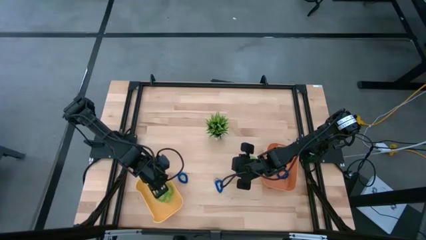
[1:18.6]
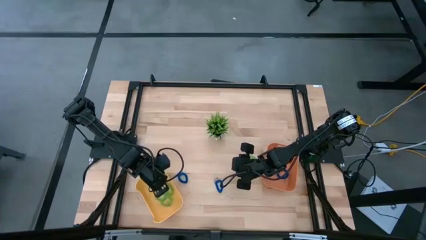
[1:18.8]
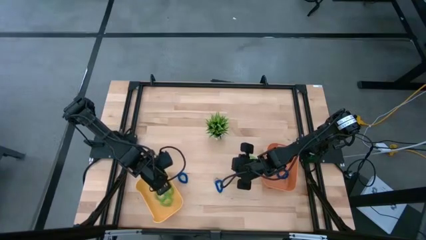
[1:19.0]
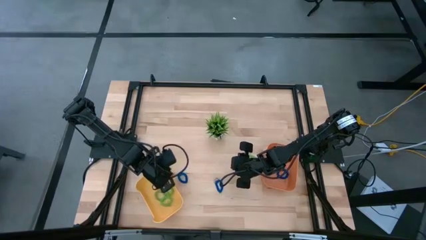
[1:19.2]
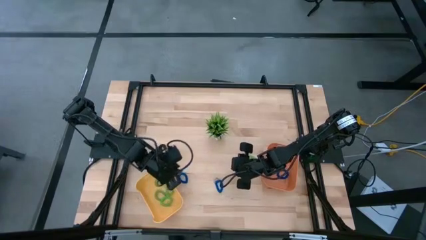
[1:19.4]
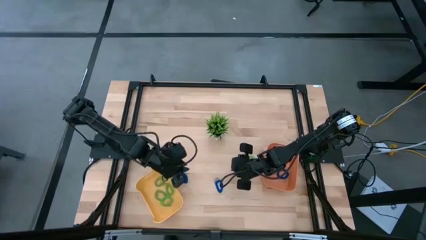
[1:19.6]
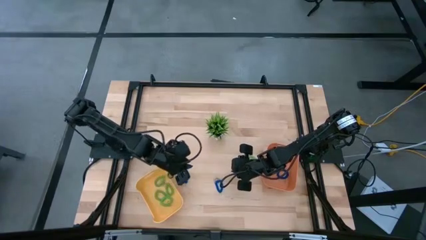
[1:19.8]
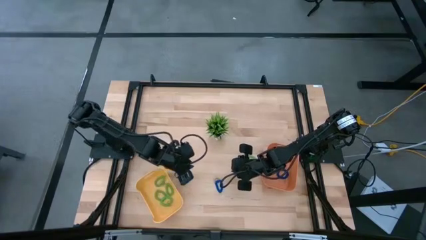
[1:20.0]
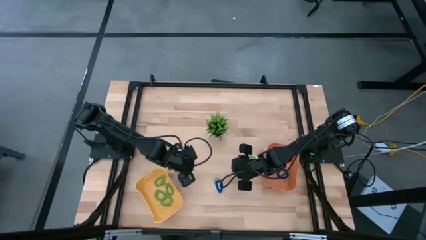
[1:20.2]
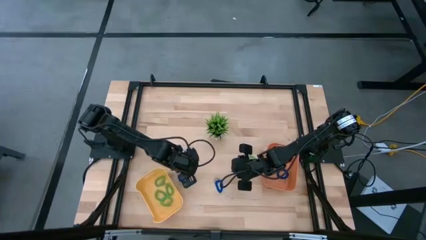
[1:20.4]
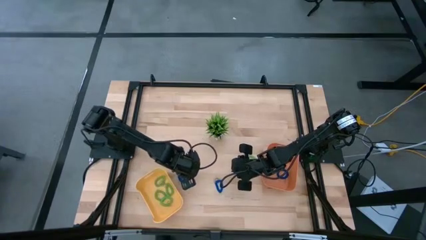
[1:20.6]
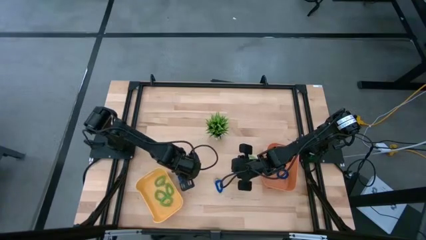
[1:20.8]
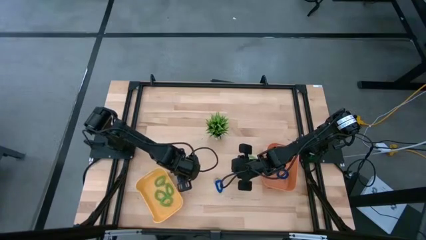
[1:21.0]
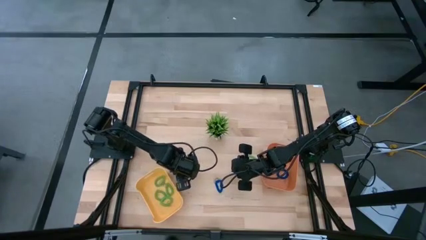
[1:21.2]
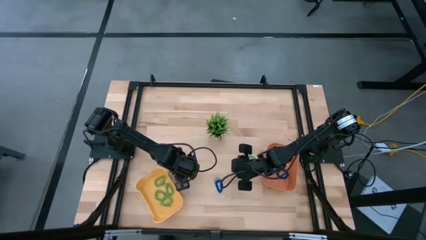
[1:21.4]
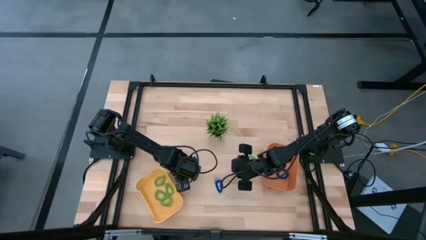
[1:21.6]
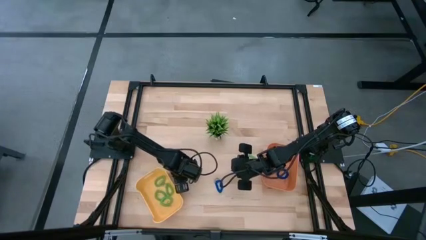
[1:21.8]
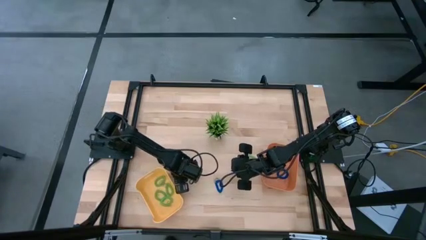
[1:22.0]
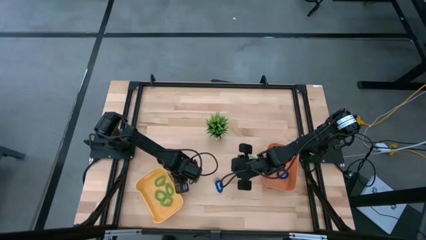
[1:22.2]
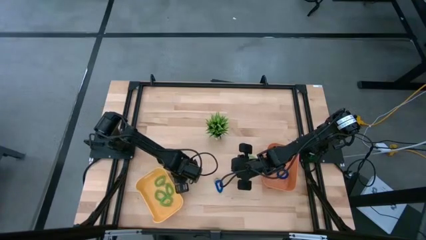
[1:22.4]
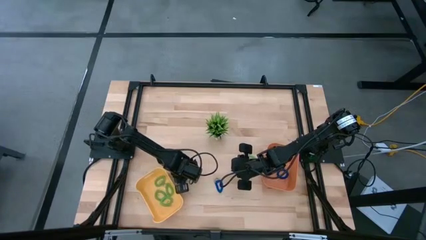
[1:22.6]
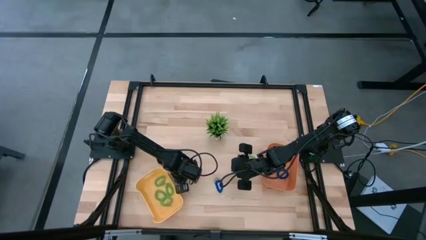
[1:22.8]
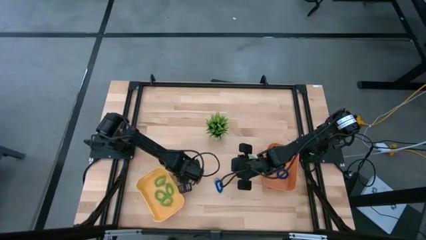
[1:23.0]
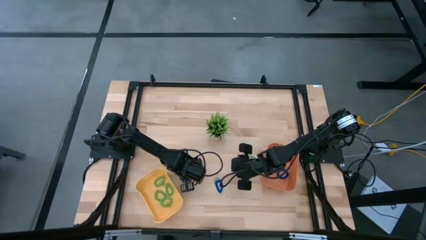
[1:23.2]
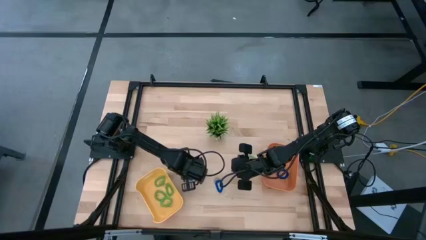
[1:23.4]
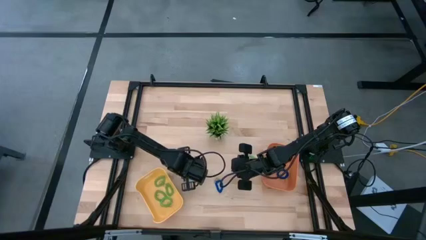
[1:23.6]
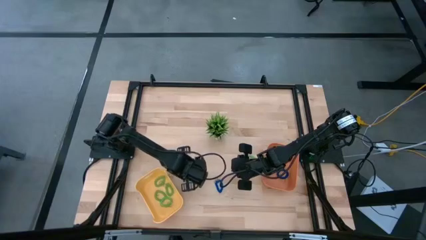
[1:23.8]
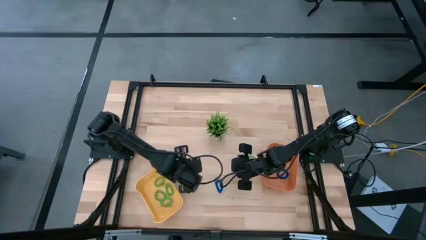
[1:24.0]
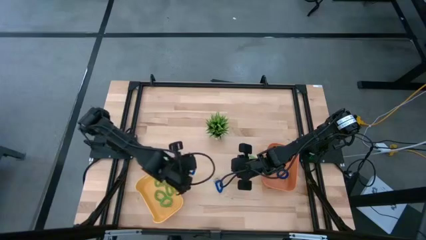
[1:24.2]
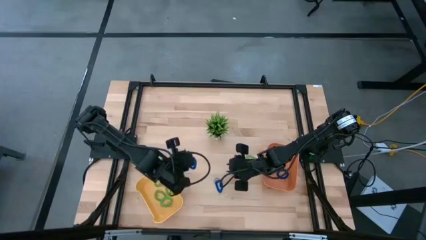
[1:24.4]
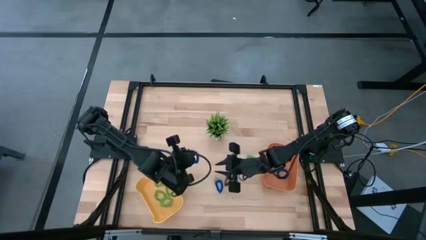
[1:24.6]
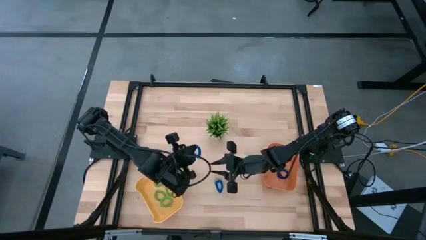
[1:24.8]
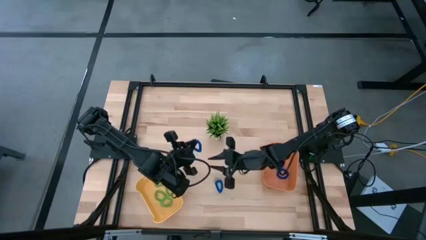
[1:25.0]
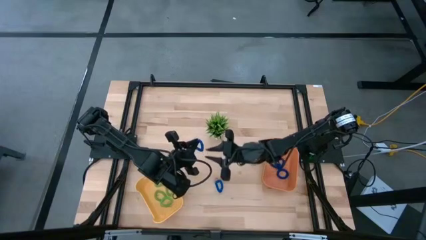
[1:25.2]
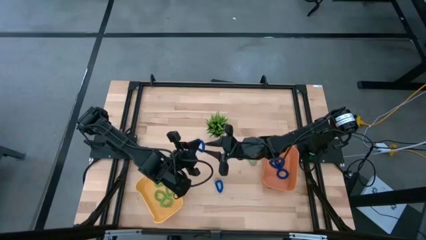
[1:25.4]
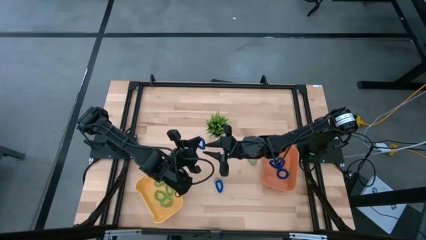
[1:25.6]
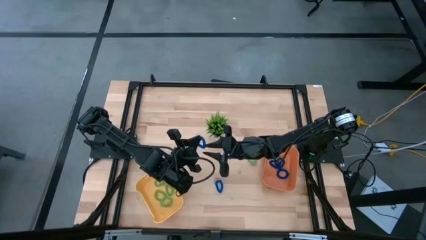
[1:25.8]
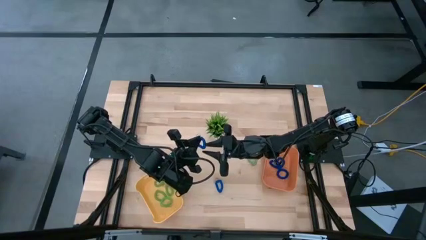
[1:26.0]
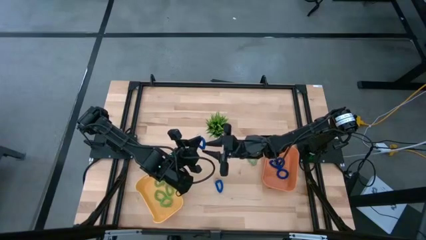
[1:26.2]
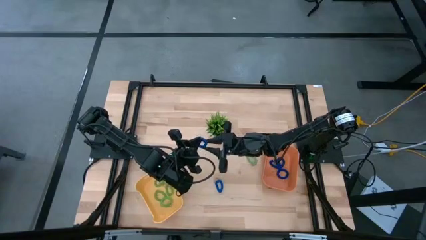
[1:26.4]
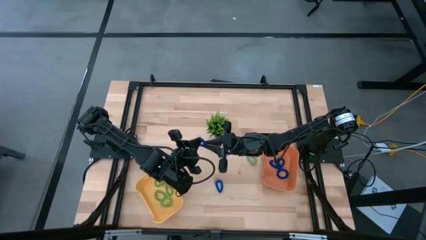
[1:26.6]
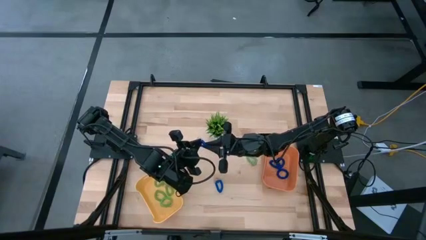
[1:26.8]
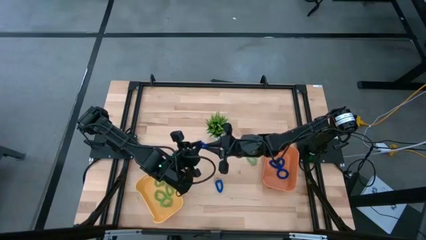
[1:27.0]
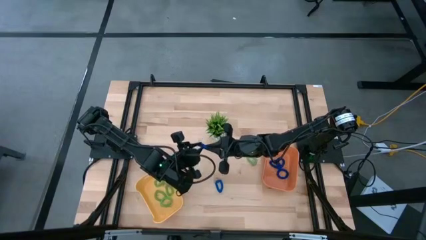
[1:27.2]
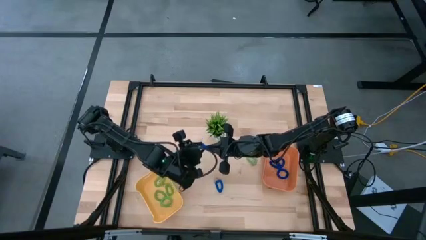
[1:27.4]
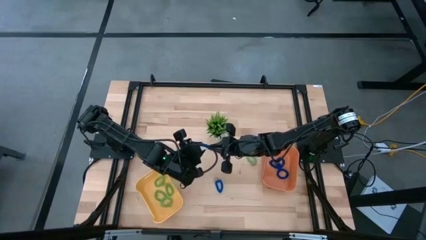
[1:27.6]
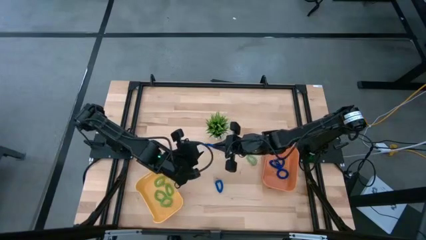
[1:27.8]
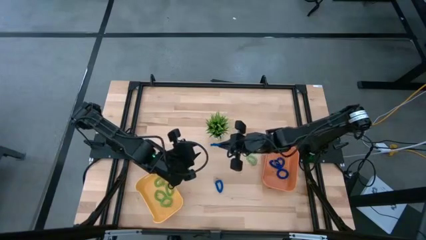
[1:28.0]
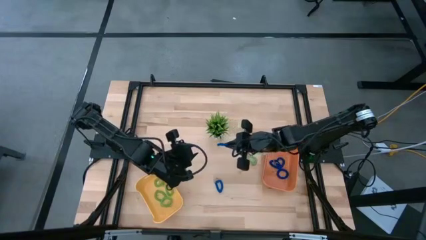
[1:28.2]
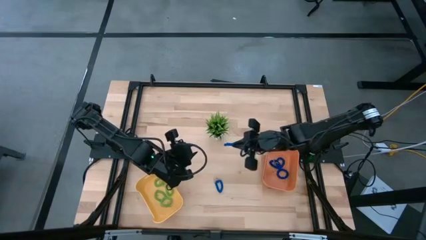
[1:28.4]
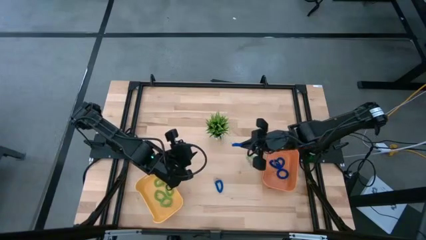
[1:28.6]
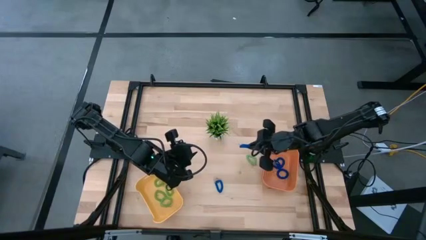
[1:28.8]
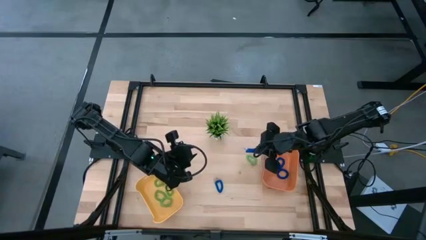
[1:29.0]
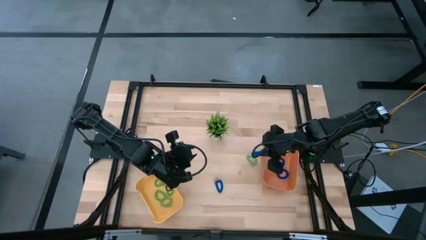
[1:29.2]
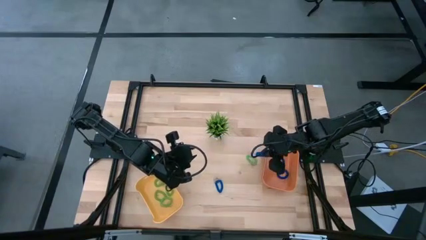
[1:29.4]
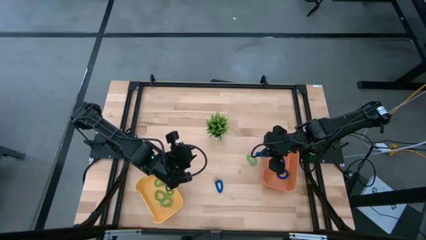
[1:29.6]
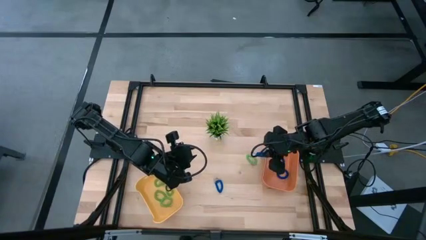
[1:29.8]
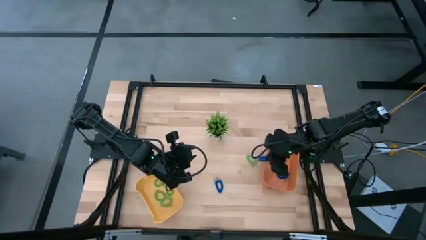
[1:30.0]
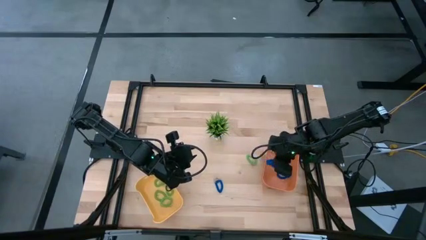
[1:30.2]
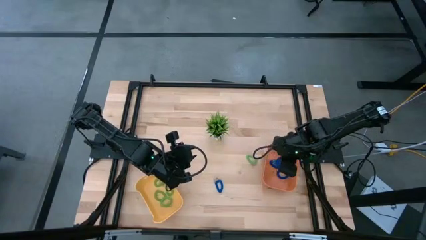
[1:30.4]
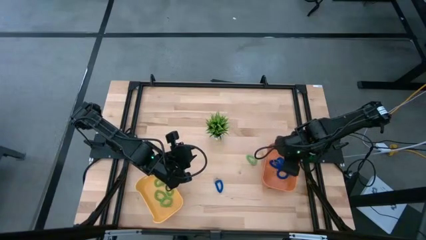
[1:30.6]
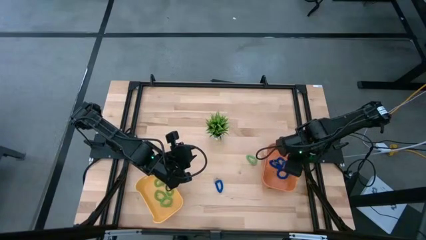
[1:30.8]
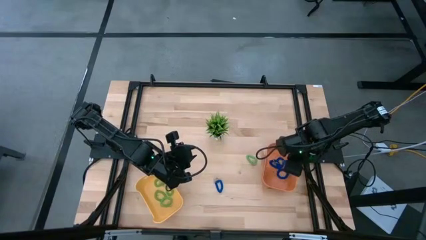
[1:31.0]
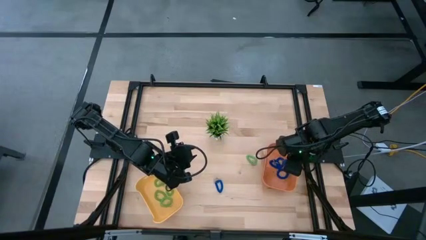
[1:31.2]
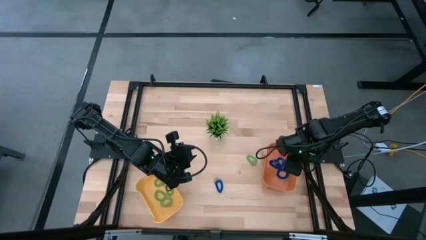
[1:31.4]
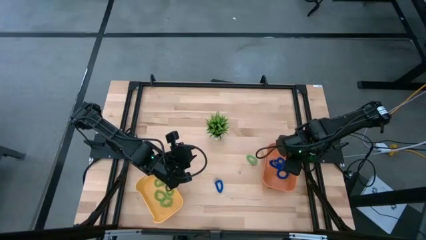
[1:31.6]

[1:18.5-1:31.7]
Task: Sort spring keychains
Put the blue spring keychain into the orange bin

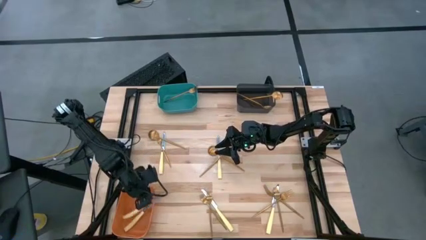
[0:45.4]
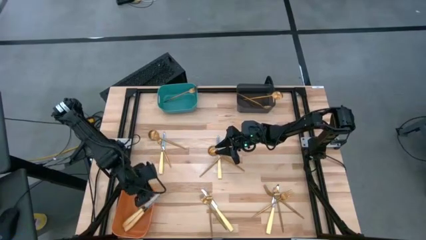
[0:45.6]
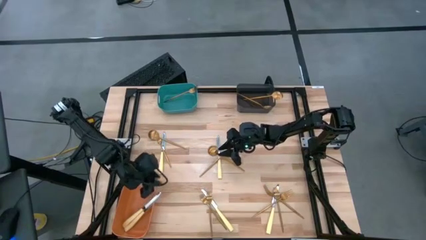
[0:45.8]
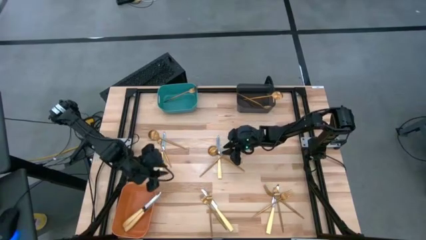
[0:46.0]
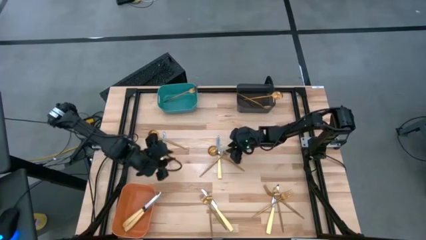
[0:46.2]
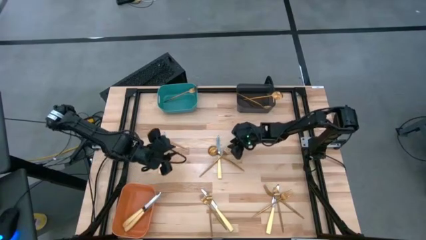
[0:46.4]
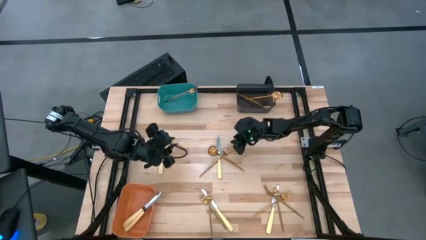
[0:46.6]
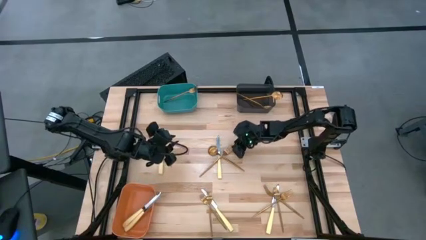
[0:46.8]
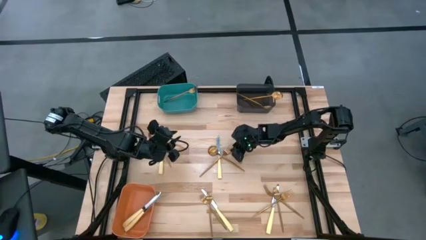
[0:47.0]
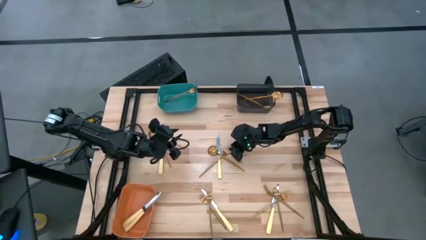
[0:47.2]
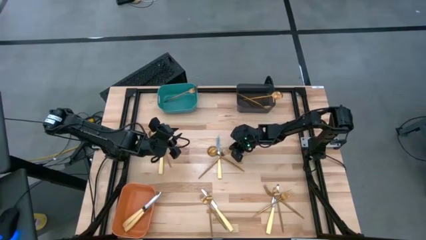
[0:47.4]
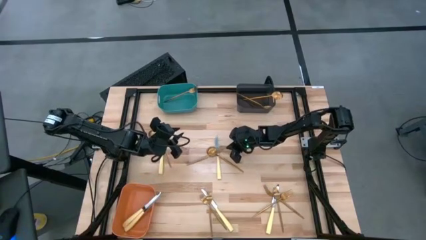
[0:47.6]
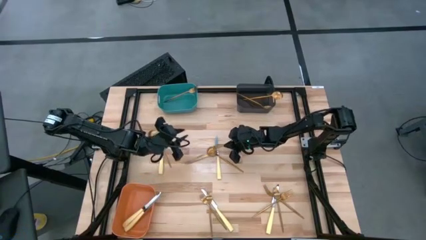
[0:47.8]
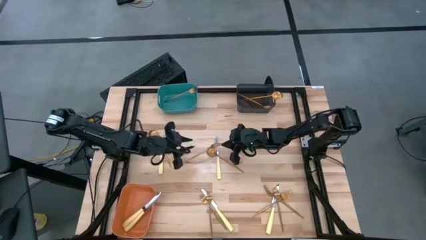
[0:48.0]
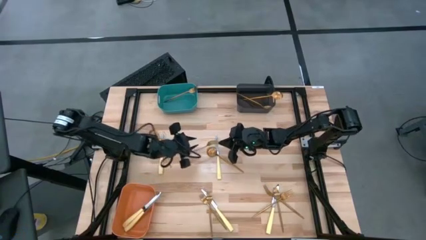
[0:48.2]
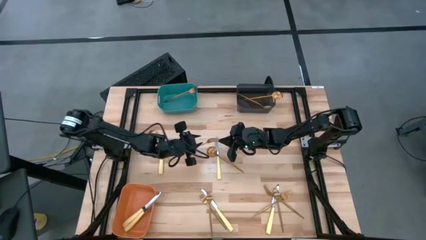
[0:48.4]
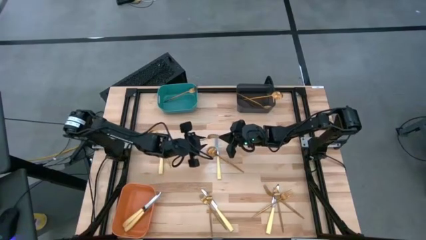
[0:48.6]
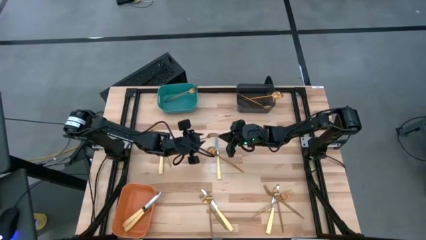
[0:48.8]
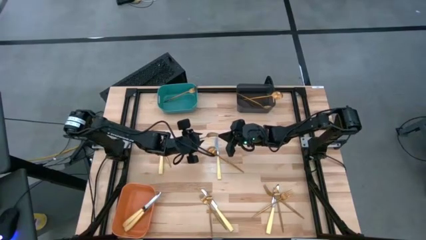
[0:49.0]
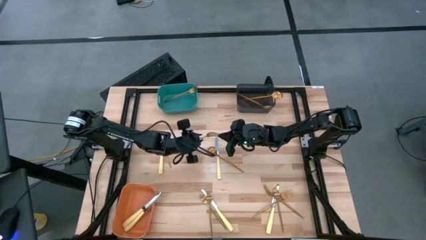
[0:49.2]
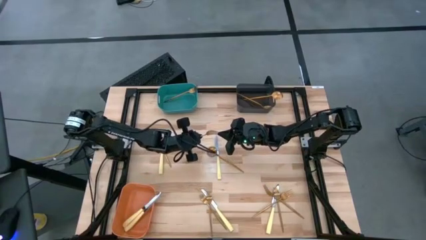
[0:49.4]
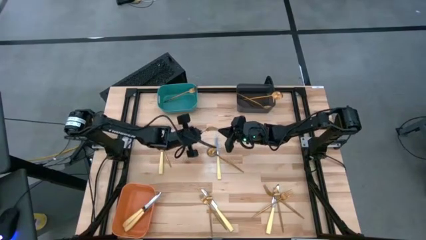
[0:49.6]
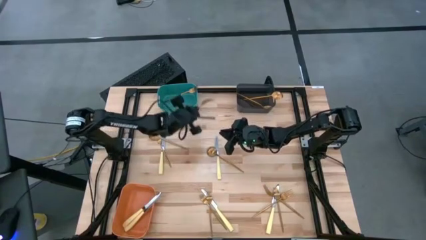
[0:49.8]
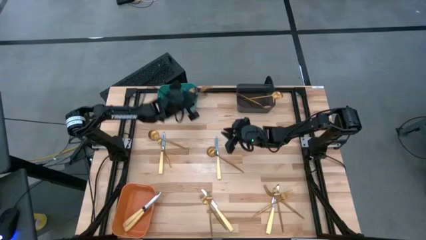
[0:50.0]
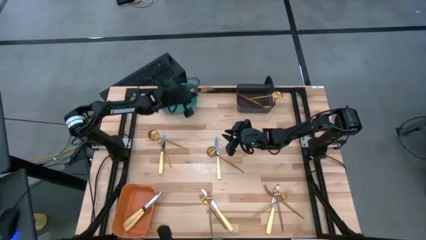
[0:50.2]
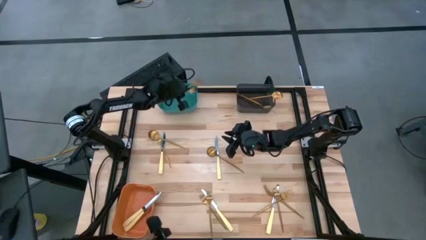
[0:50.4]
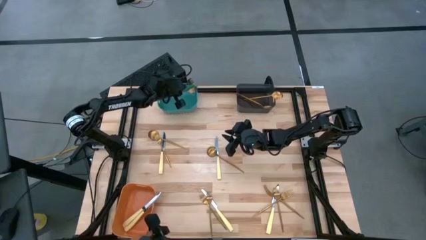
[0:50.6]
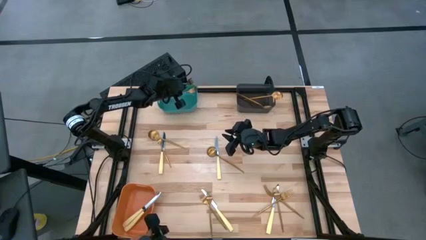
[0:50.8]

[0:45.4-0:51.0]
Task: Sort silverware by color (type)
Put the gold fork into the green bin
